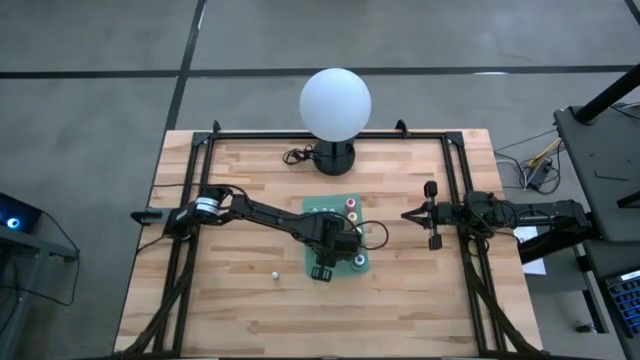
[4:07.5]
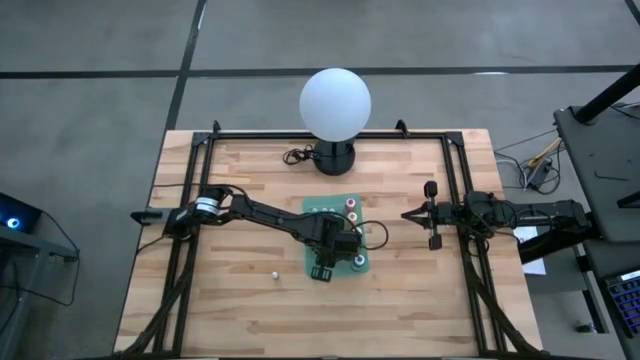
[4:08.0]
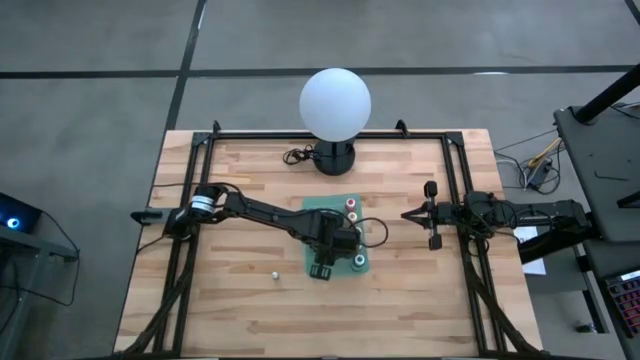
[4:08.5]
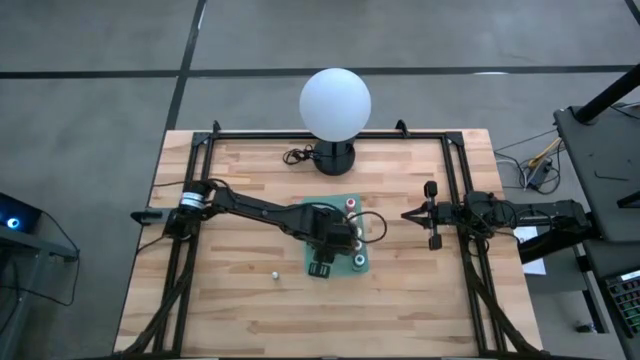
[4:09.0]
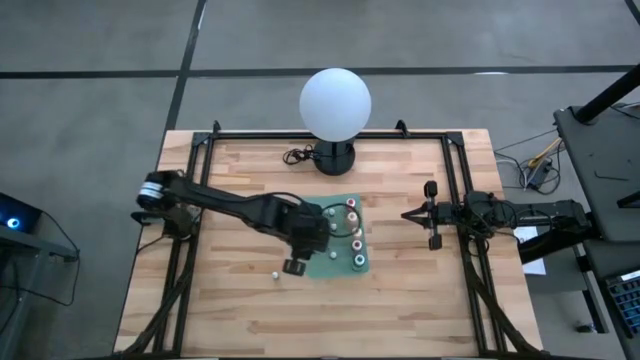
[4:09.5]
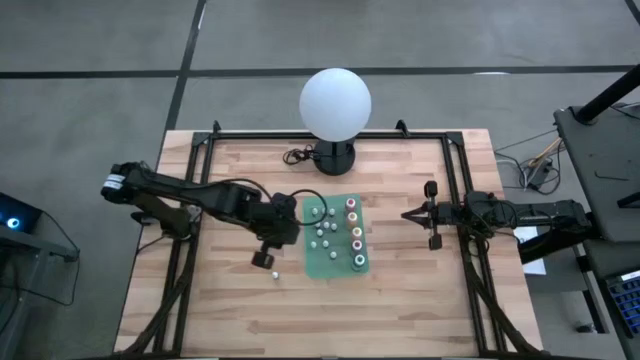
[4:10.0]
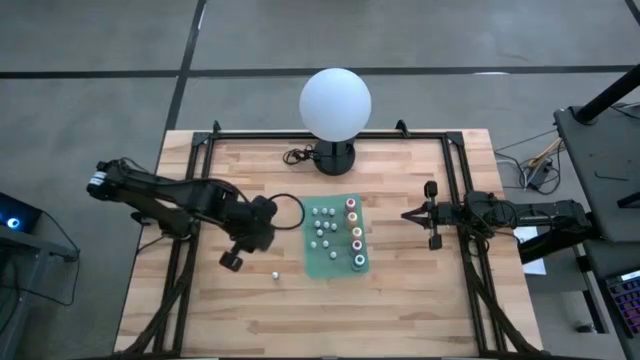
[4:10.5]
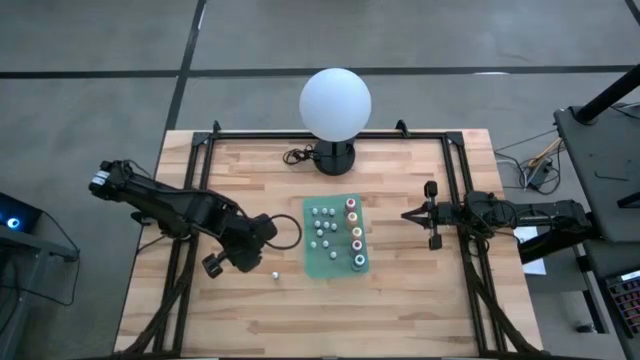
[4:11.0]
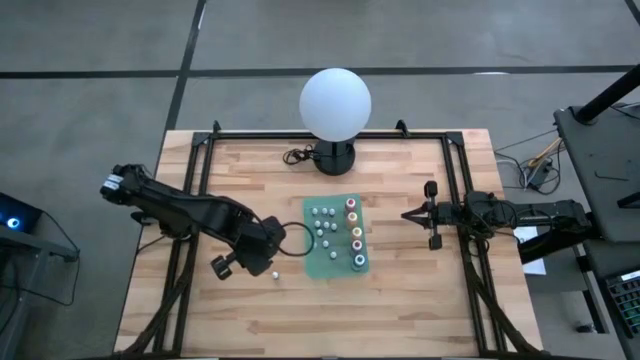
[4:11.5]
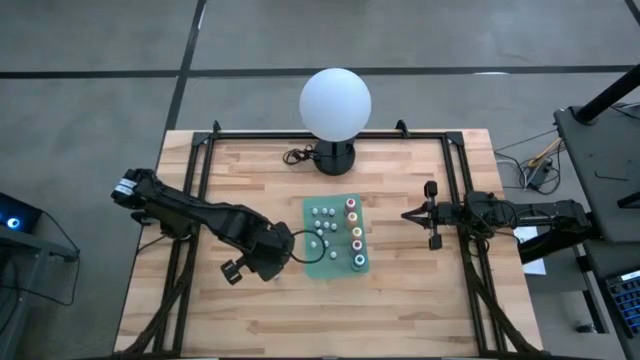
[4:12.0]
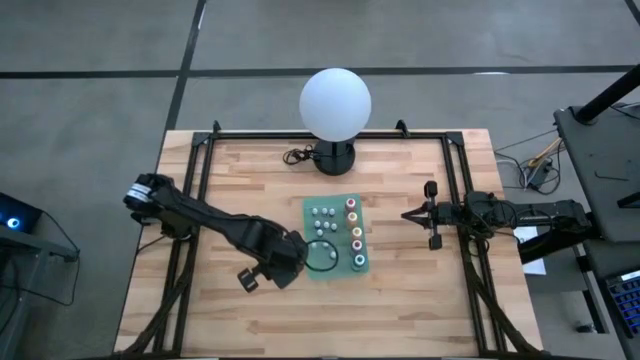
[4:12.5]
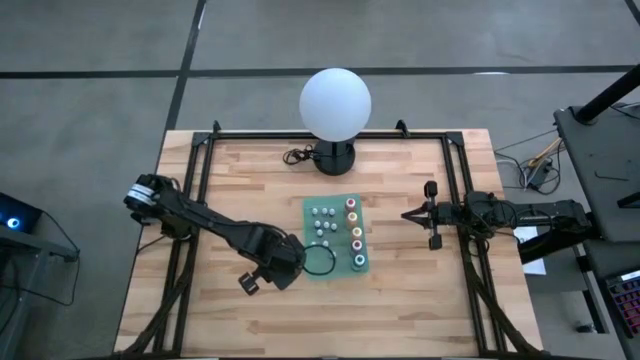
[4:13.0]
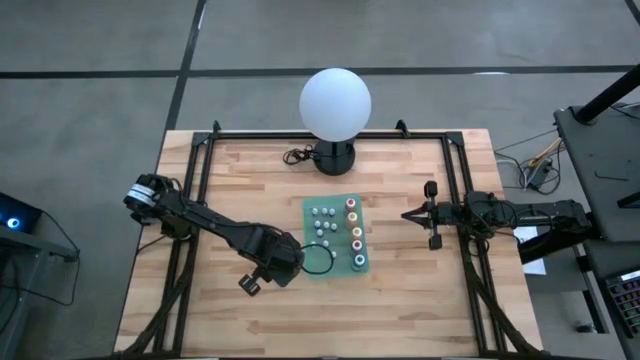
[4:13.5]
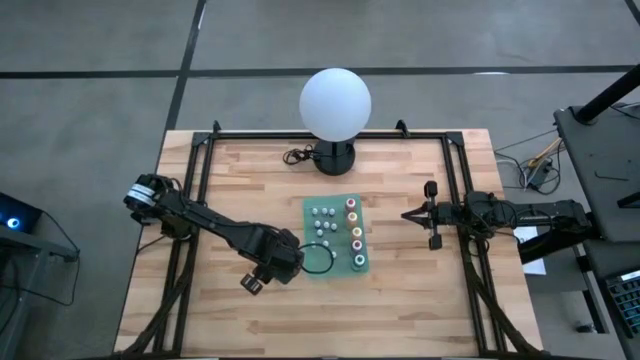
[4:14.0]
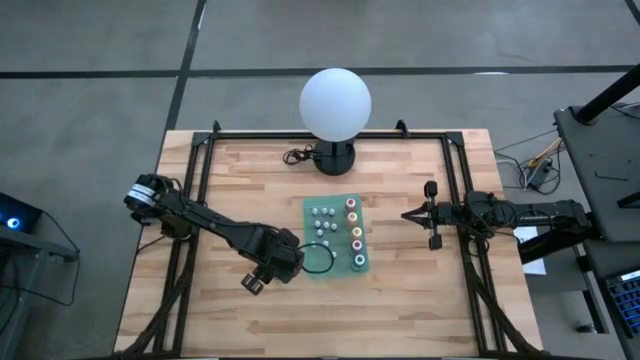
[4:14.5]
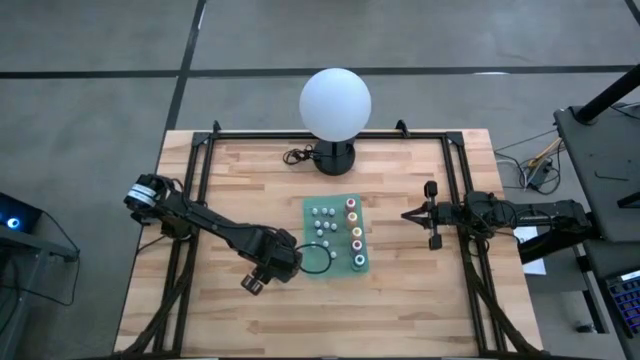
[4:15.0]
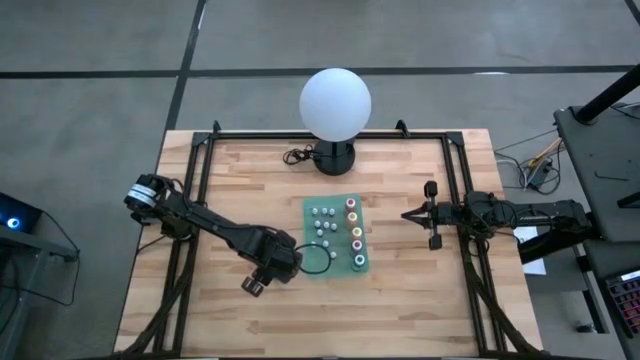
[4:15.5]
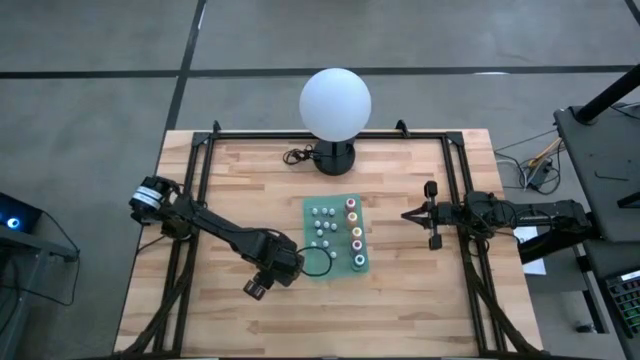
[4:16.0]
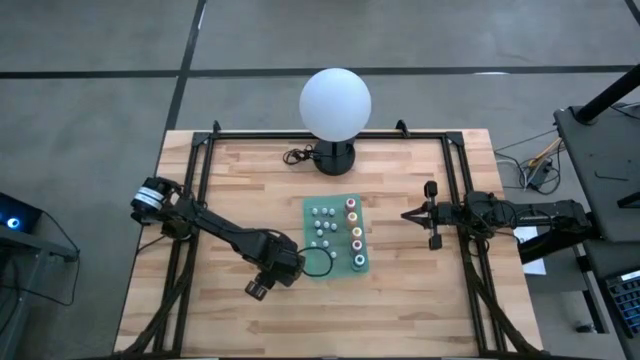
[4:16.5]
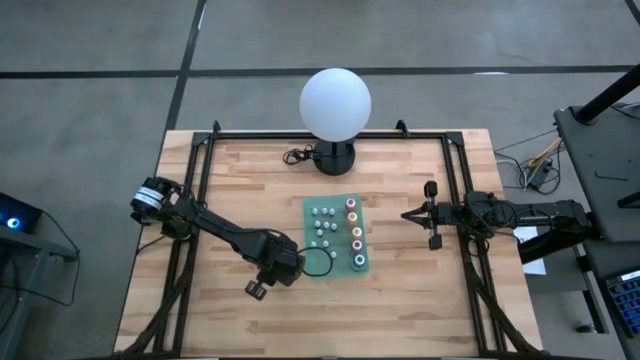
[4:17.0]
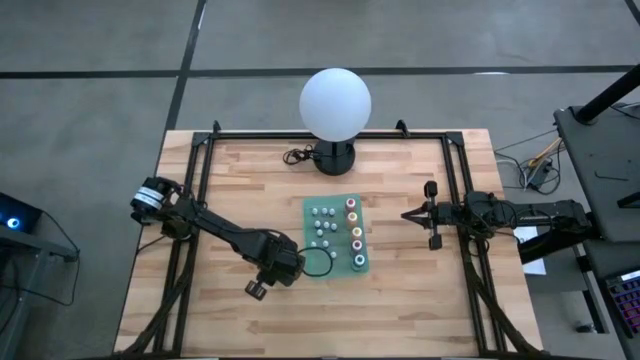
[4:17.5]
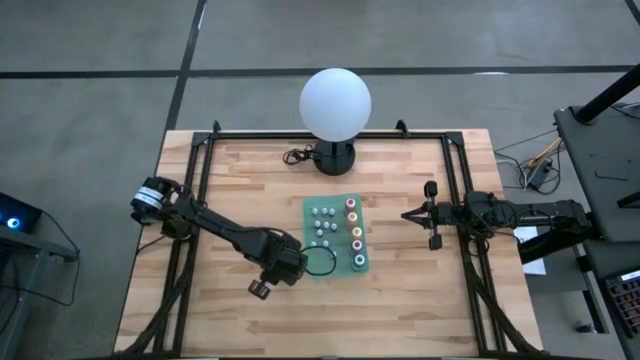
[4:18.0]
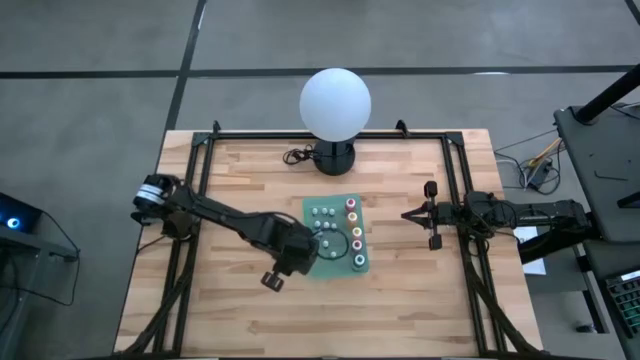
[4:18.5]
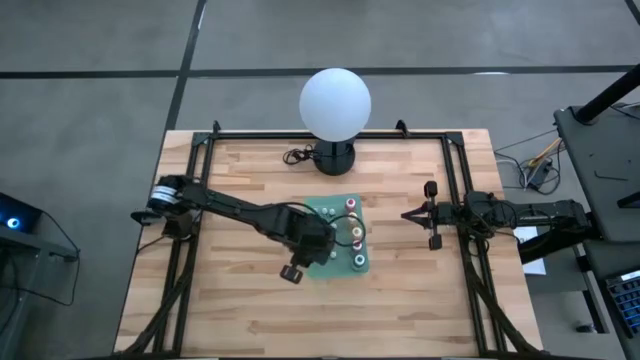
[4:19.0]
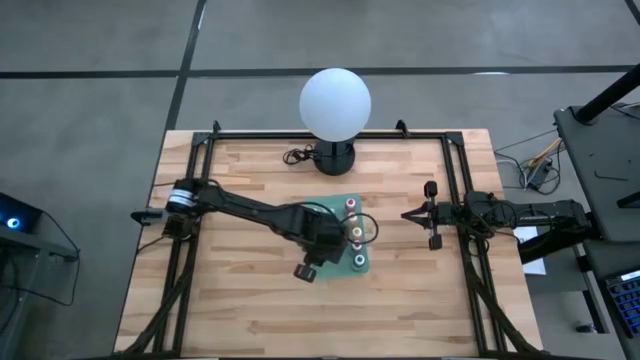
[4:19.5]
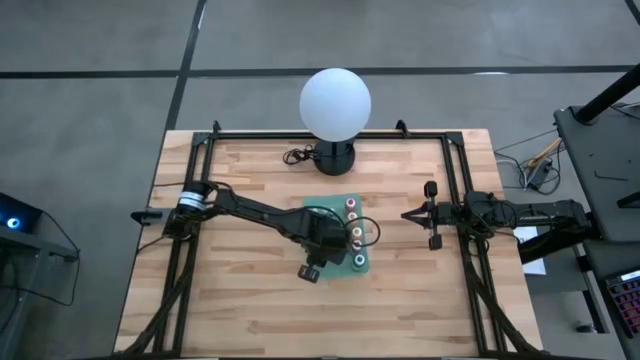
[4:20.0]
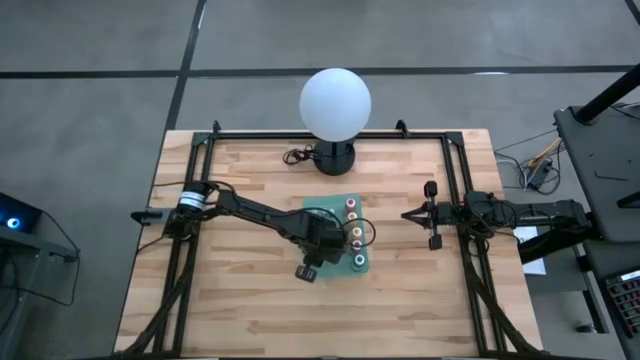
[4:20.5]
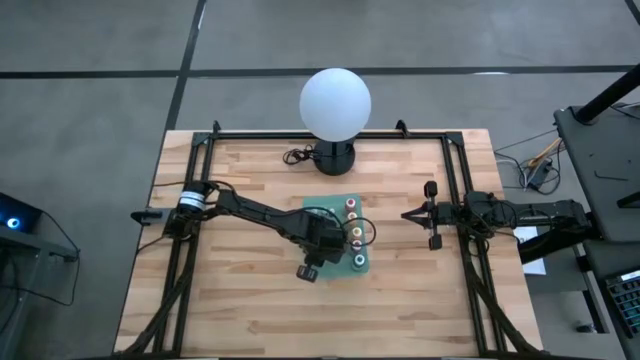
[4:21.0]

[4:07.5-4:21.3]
Task: Pick & Place food coloring
Put the small green food coloring bottle into the green bin

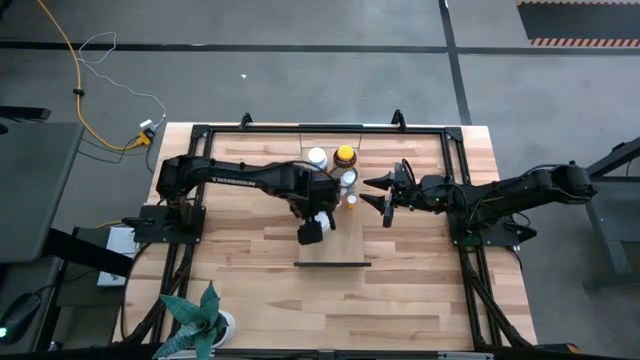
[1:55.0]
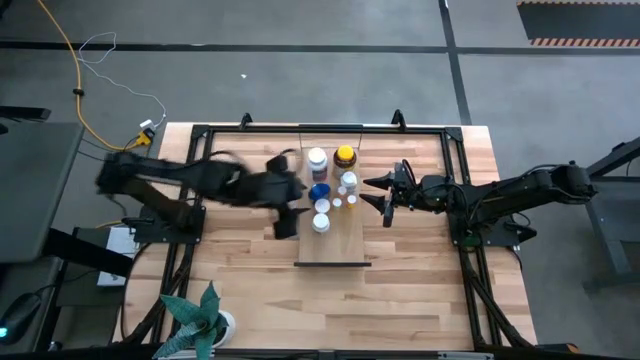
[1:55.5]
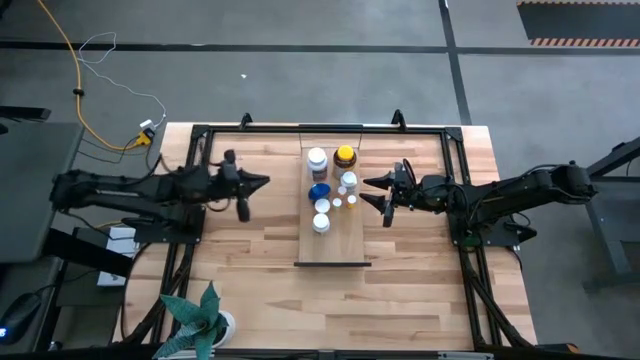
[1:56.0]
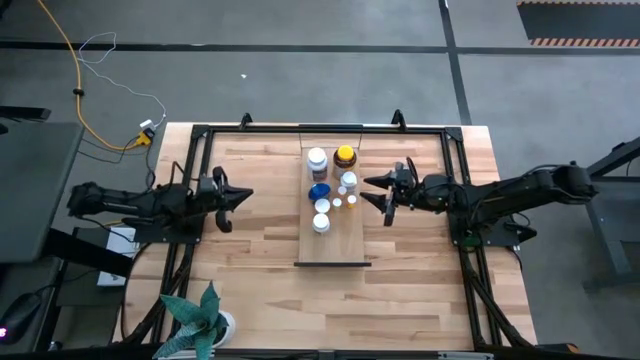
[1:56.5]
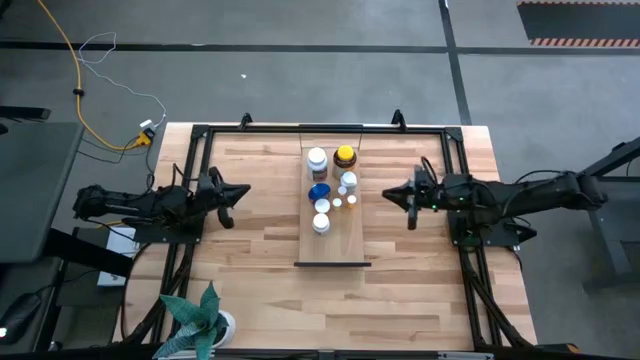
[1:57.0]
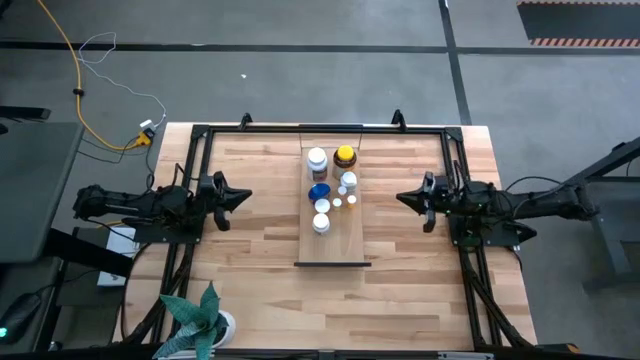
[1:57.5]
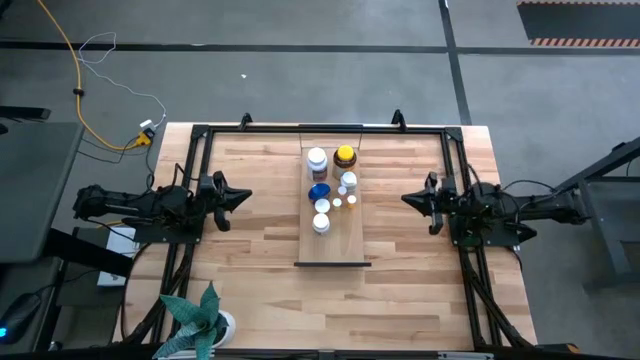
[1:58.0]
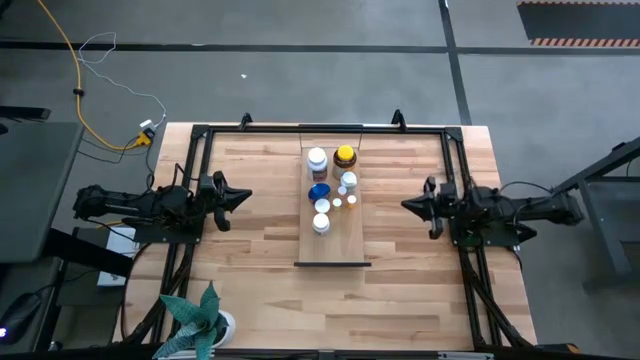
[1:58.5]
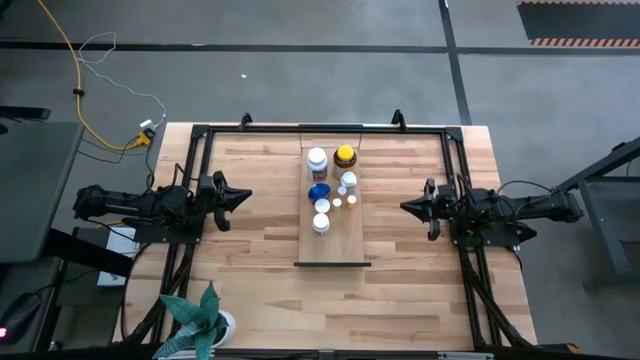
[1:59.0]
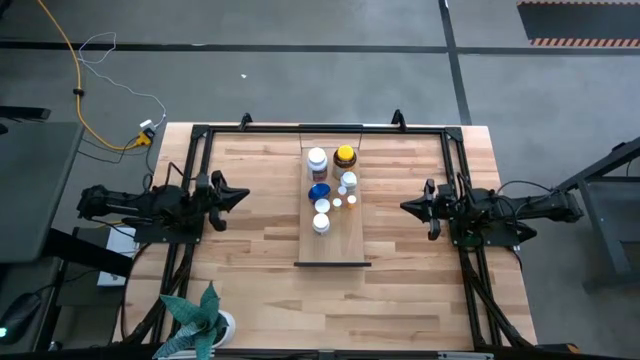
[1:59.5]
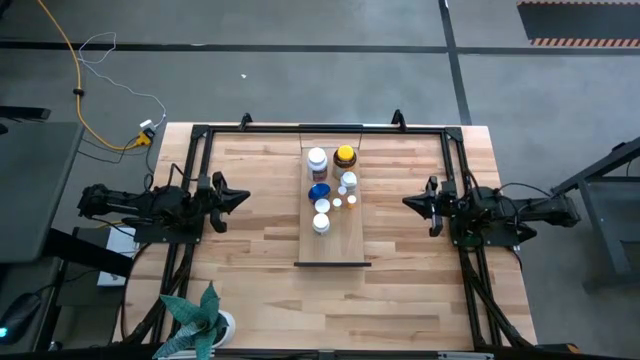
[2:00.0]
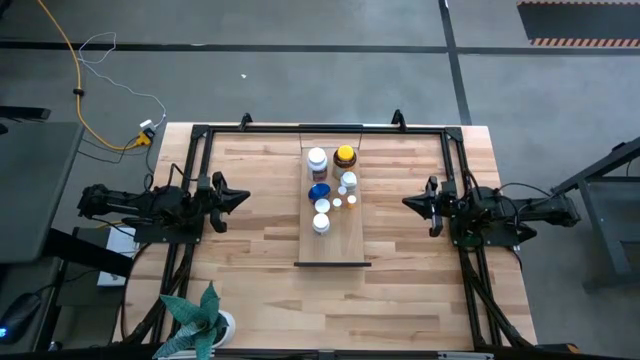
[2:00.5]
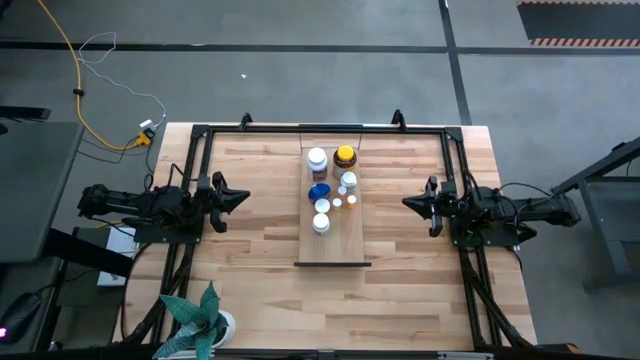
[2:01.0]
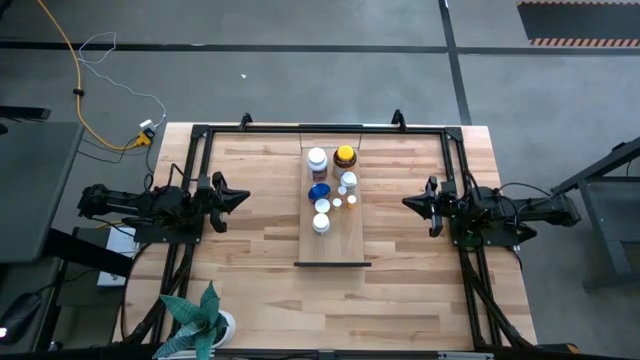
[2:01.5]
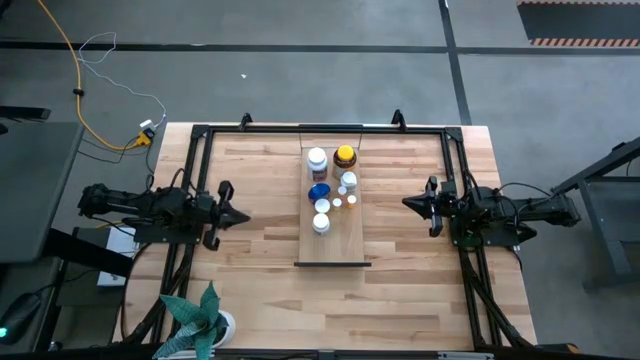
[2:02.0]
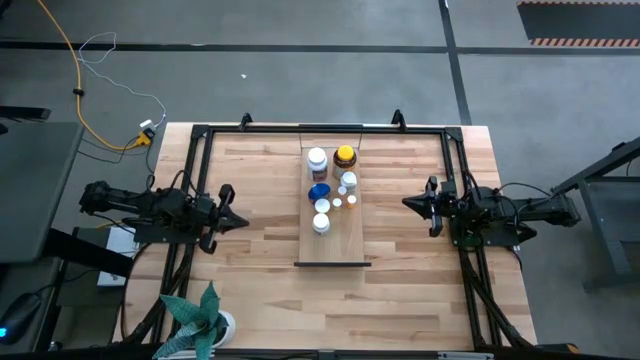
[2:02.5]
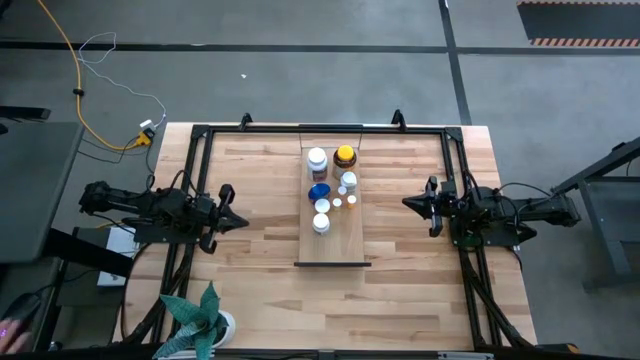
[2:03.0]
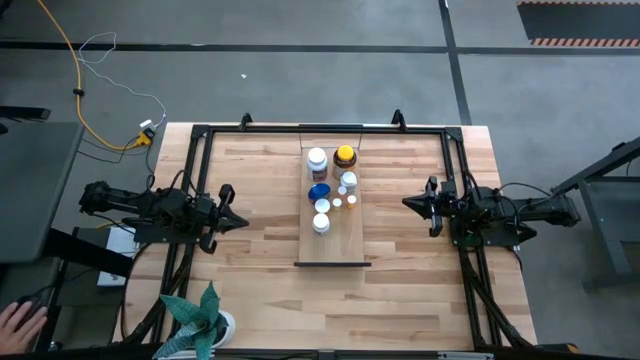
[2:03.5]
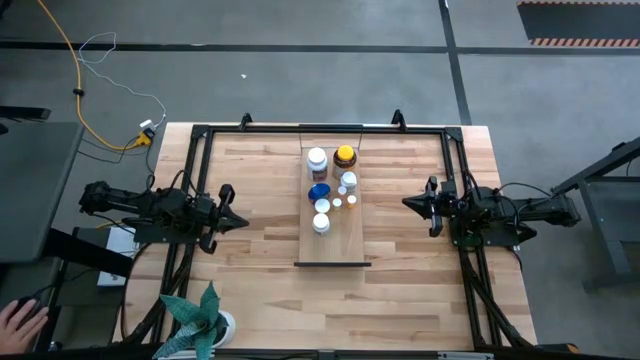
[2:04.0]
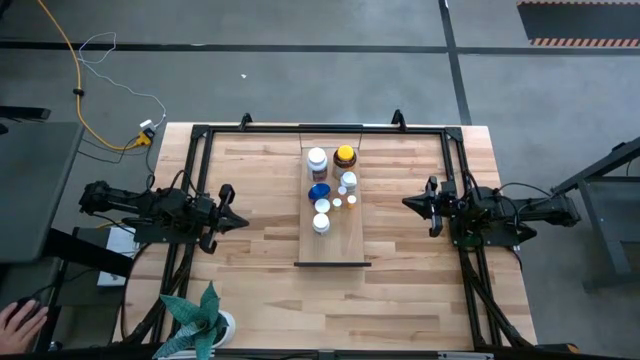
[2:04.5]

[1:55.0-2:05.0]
Task: Pick and place medicine bottles onto shelf by color
Return to Home Position
